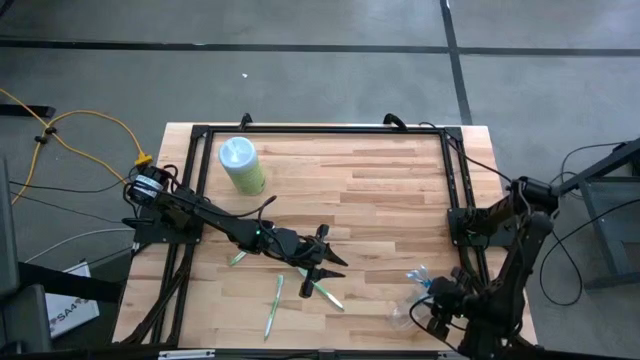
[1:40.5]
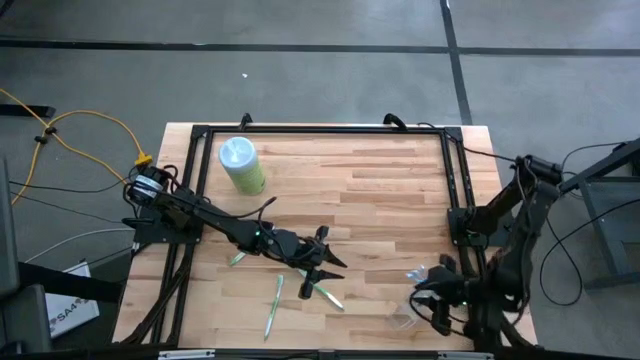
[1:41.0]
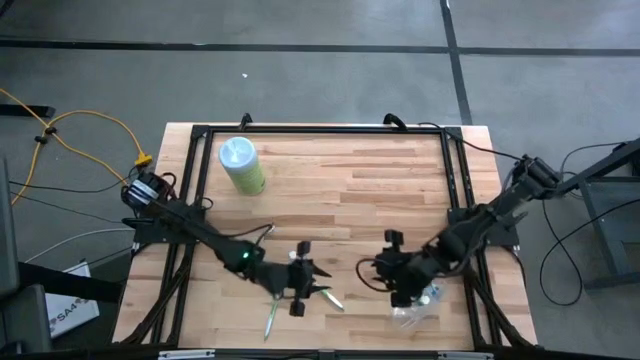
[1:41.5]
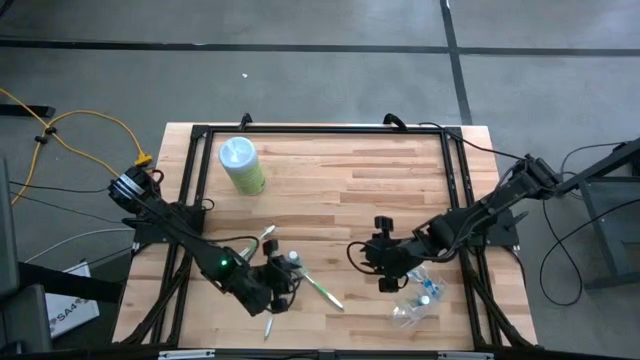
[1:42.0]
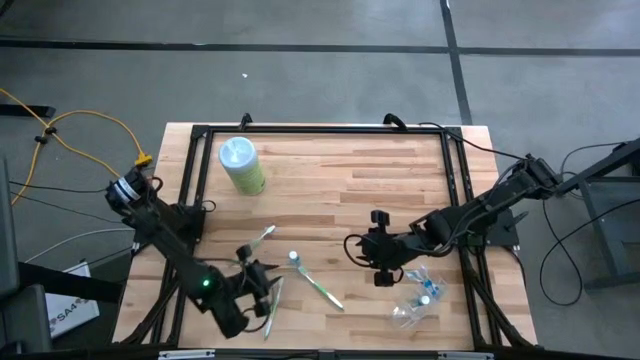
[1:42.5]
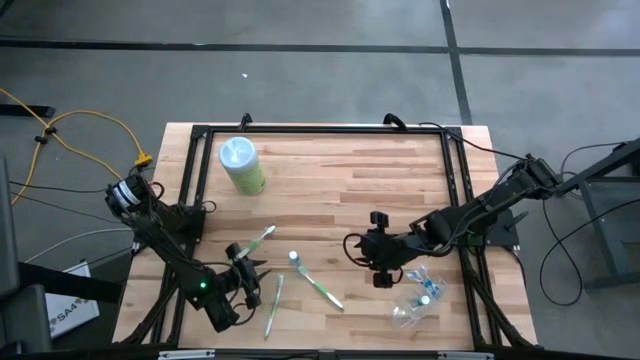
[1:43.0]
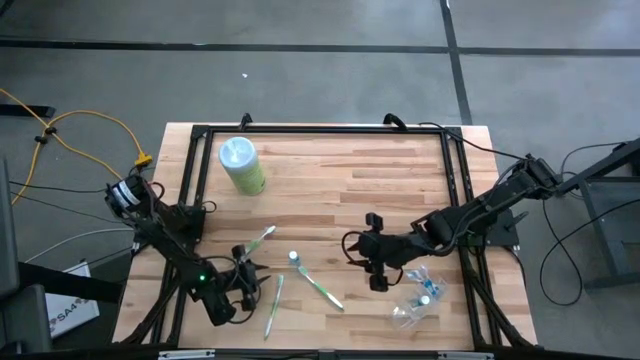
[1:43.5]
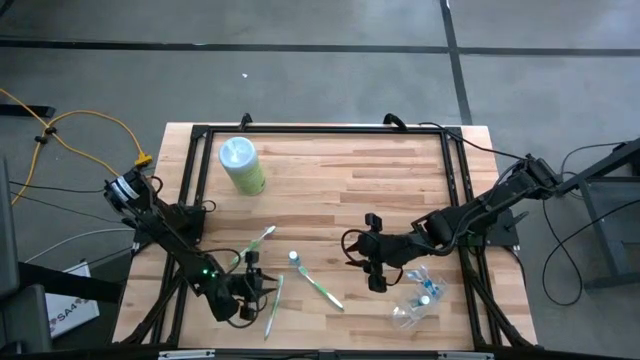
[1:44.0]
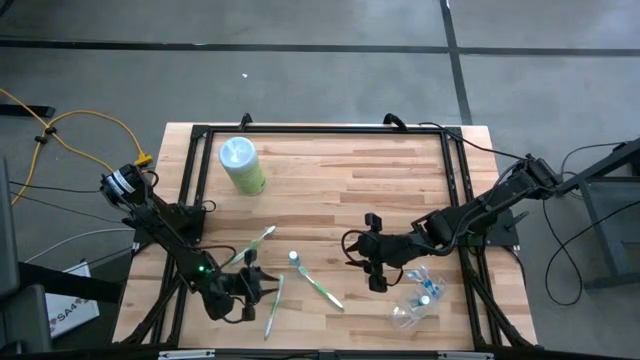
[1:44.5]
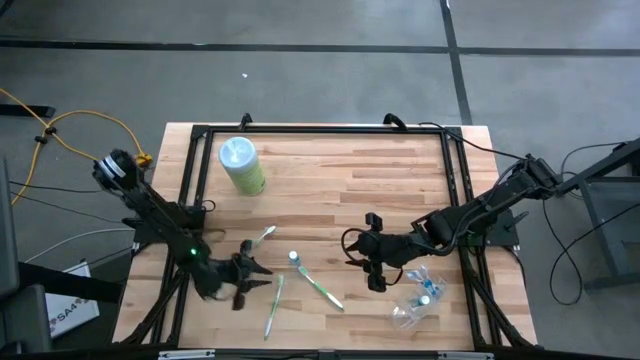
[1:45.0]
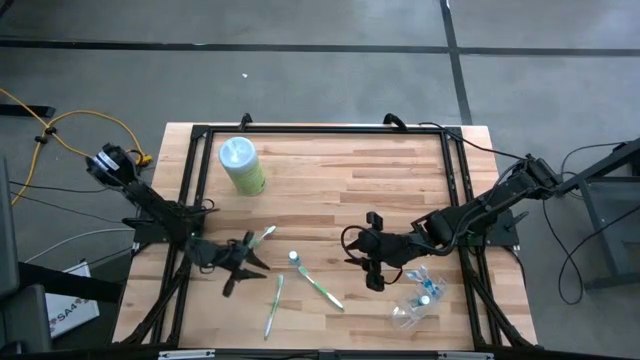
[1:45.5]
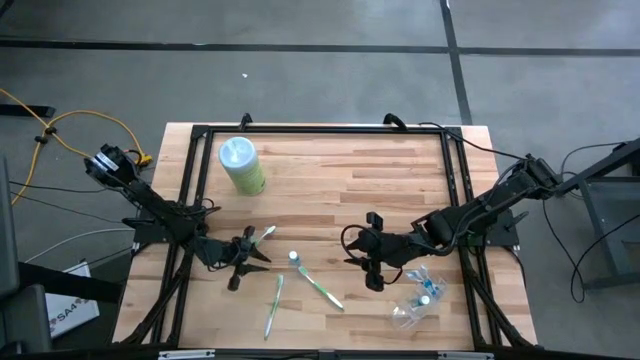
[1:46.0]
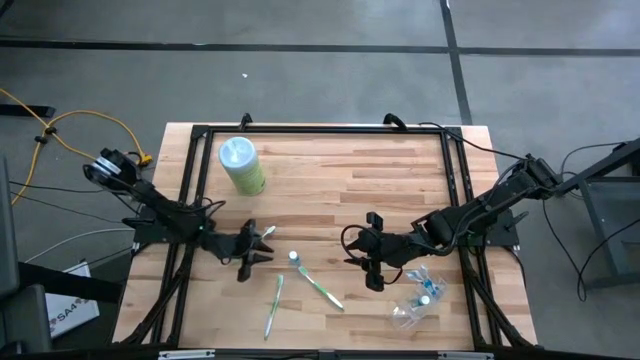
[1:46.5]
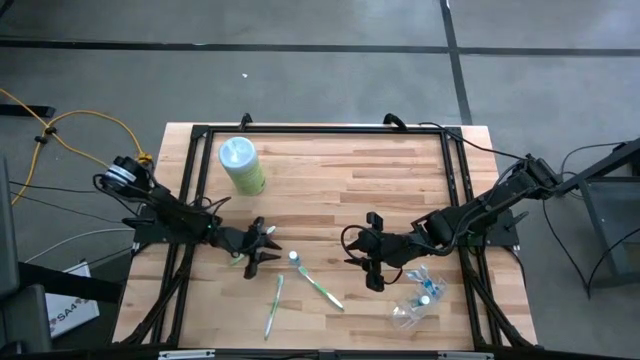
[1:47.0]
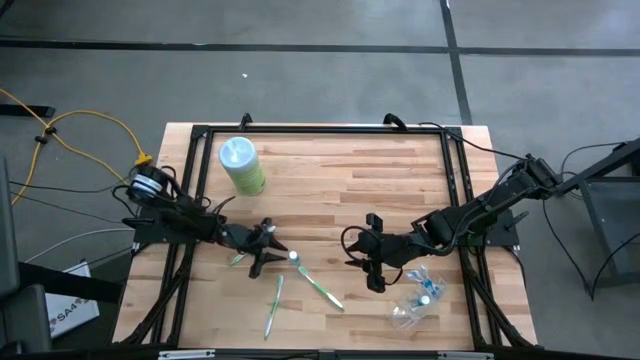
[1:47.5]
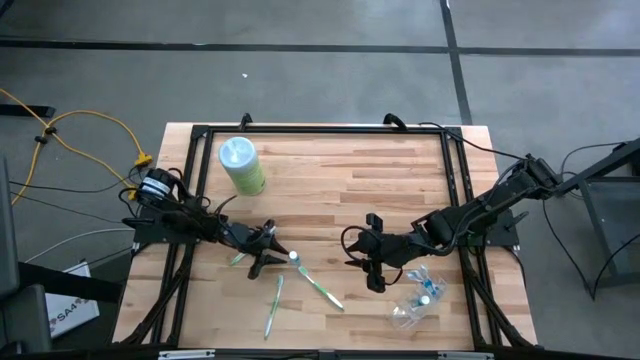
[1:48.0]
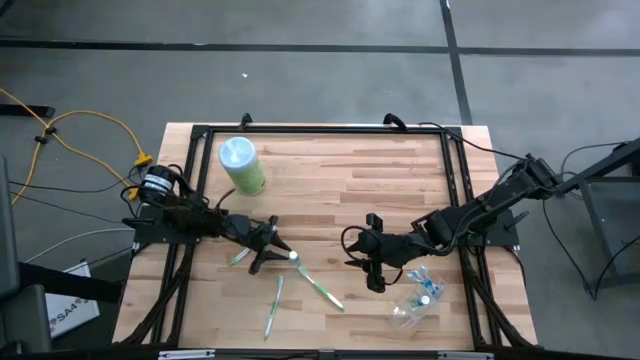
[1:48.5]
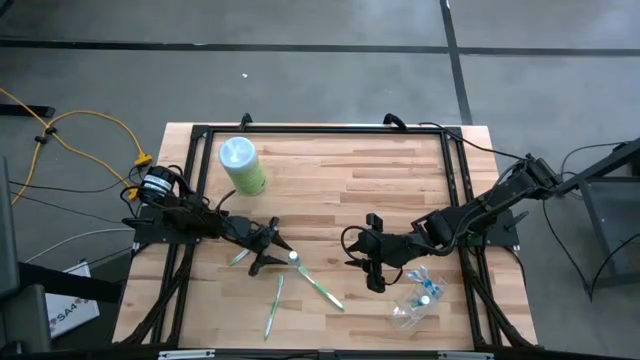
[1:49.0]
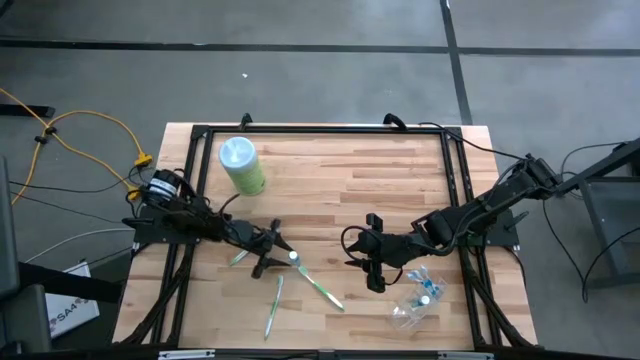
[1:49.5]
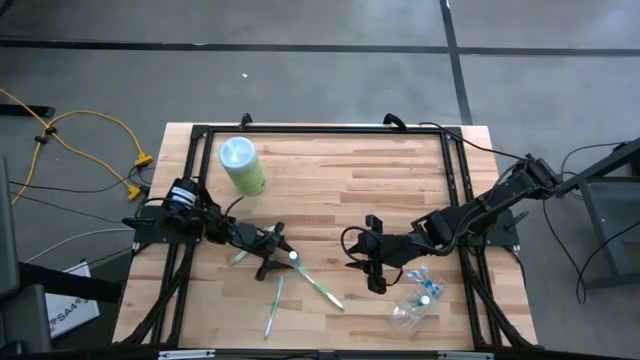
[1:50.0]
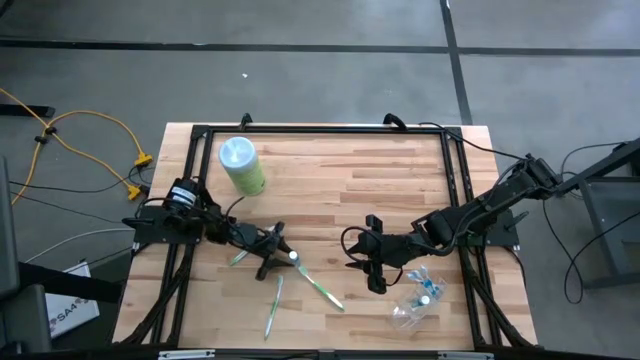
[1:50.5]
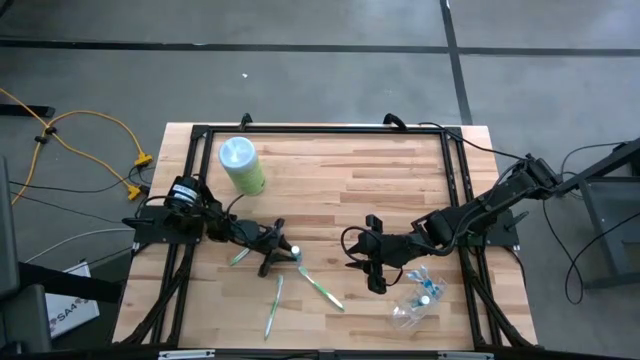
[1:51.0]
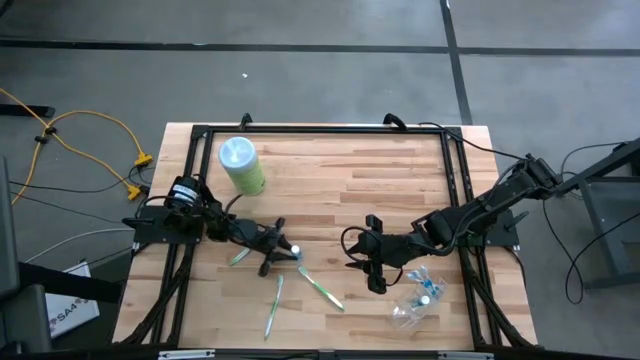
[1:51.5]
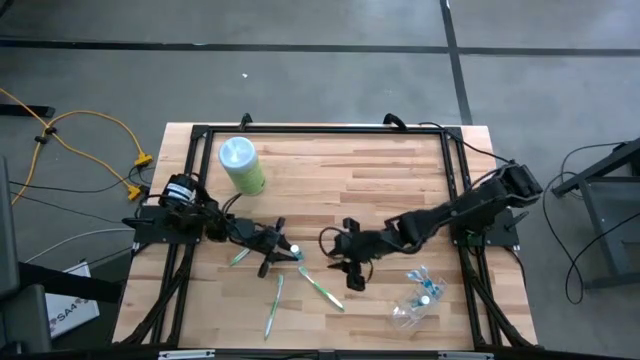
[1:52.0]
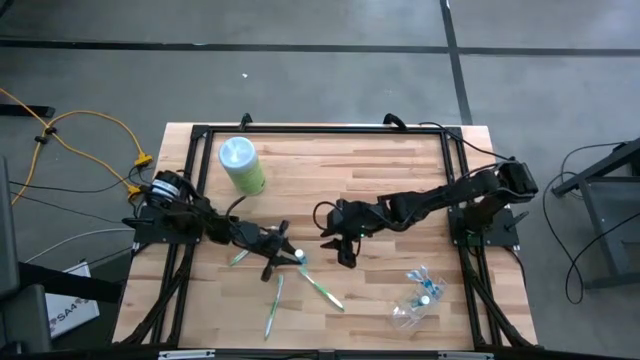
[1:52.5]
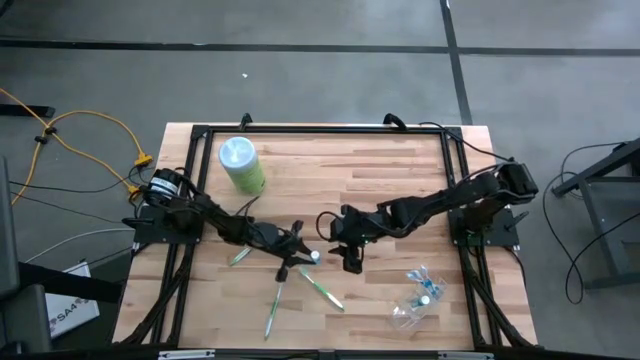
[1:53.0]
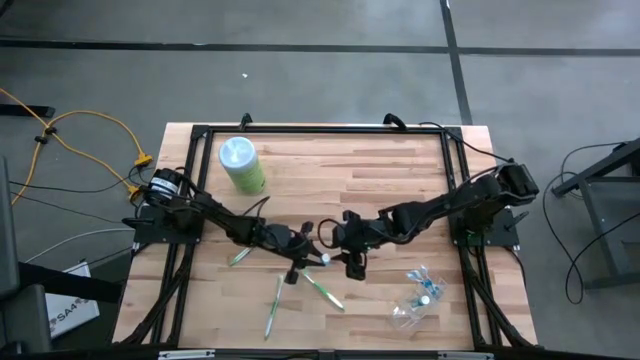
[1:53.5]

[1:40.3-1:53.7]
Task: Pick & Place toothbrushing station
Put the blue mouthwash bottle into the middle section of the transparent organizer

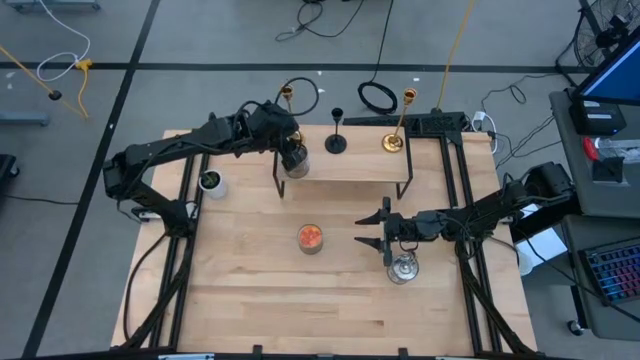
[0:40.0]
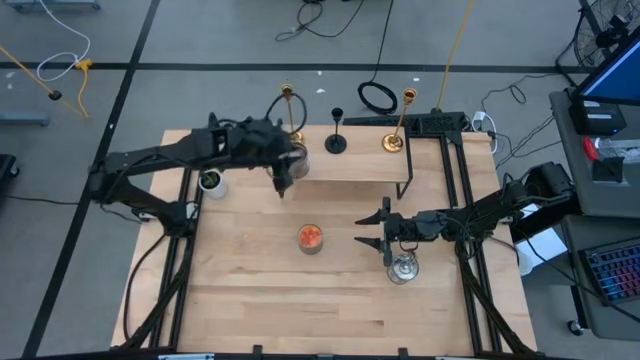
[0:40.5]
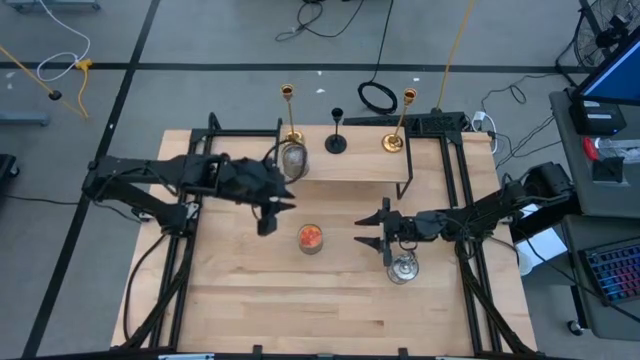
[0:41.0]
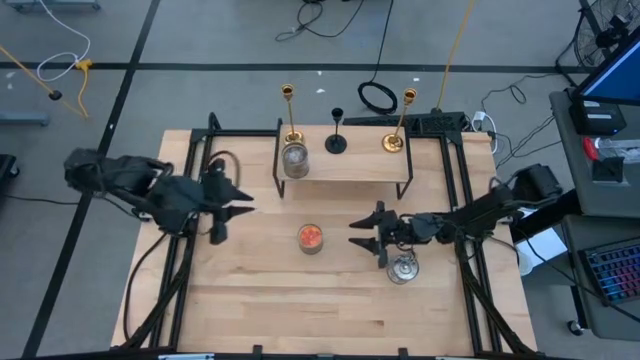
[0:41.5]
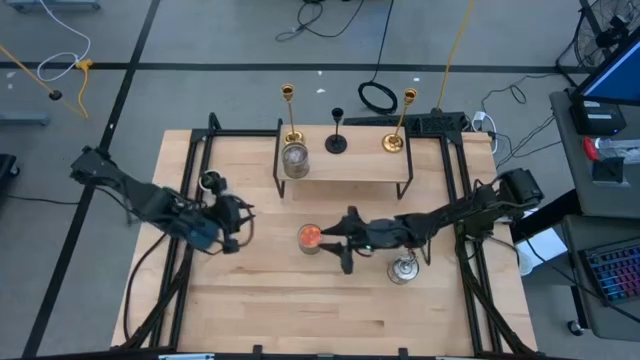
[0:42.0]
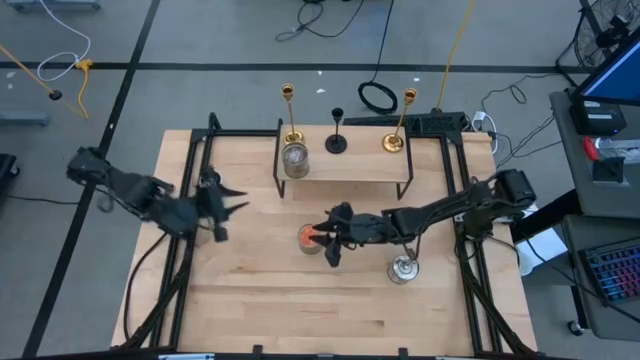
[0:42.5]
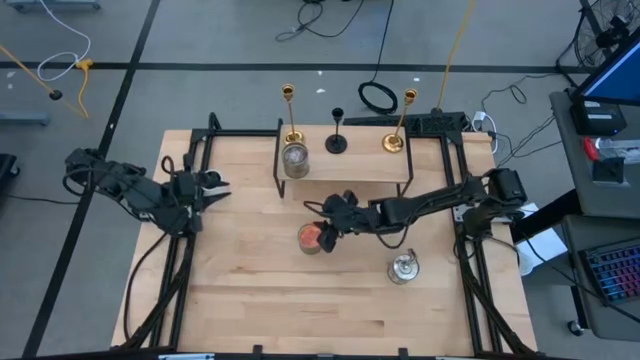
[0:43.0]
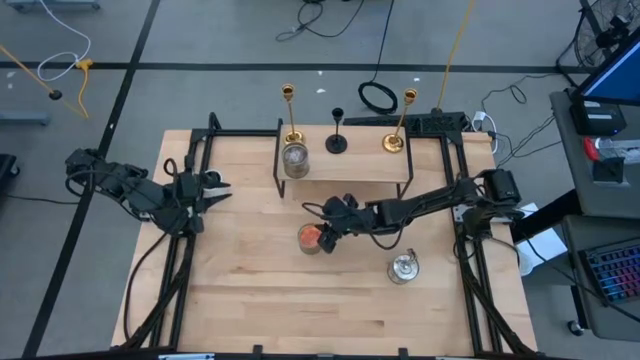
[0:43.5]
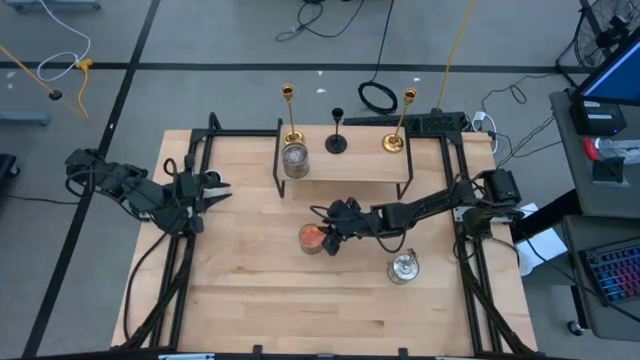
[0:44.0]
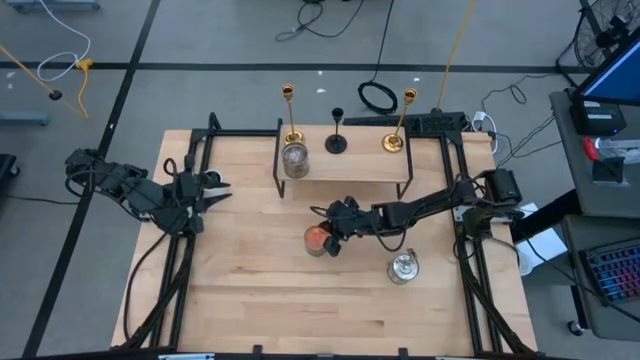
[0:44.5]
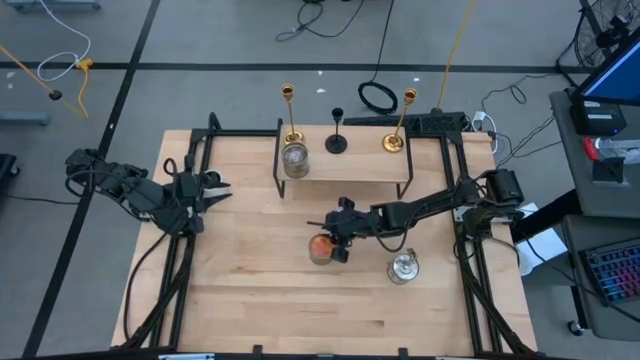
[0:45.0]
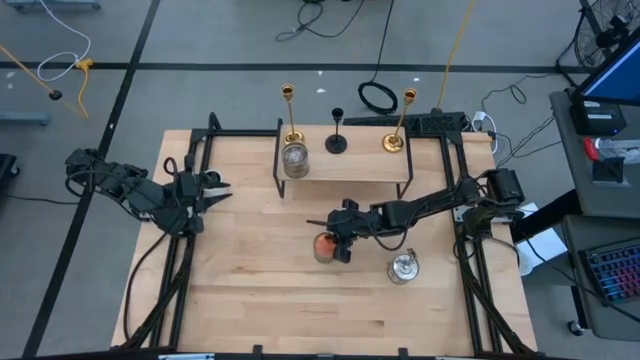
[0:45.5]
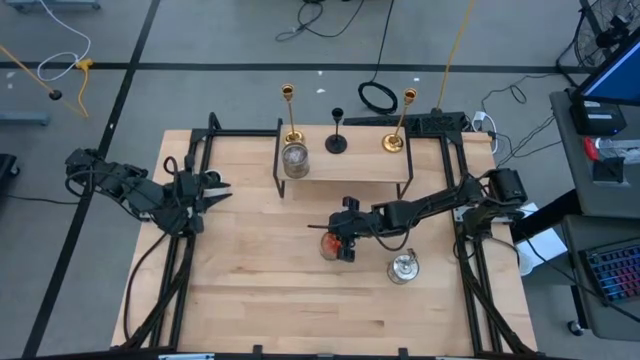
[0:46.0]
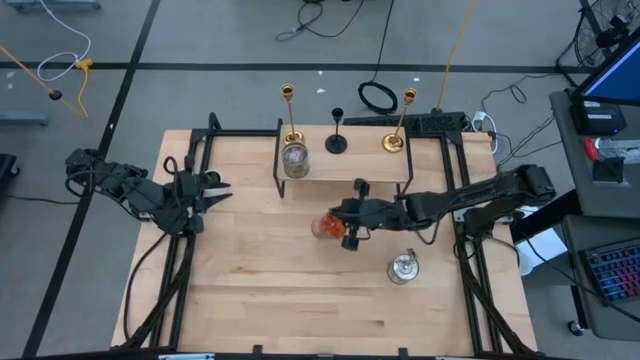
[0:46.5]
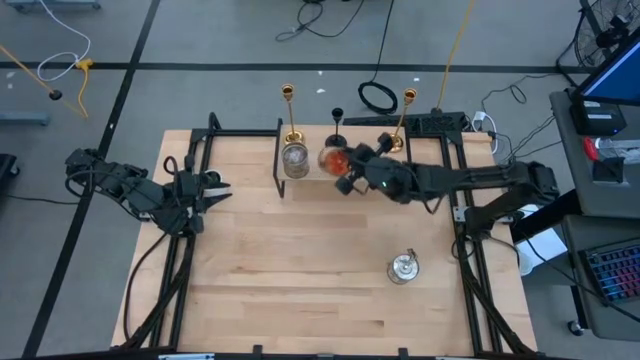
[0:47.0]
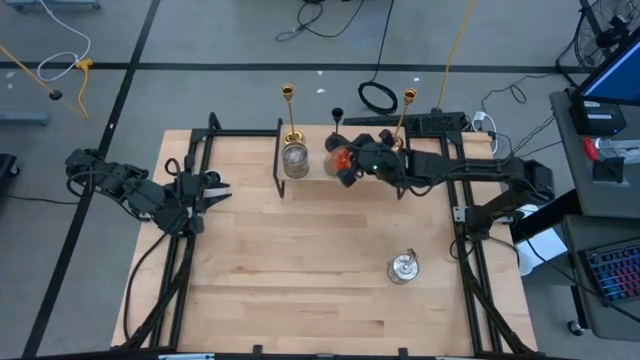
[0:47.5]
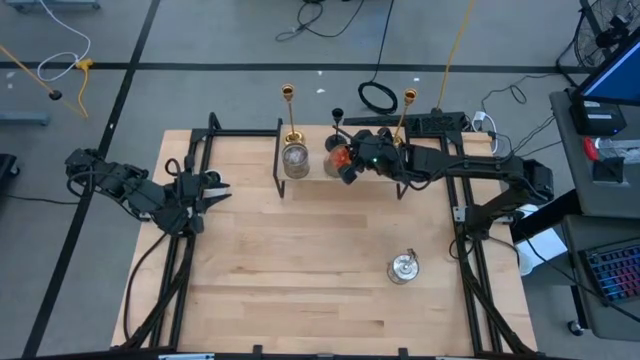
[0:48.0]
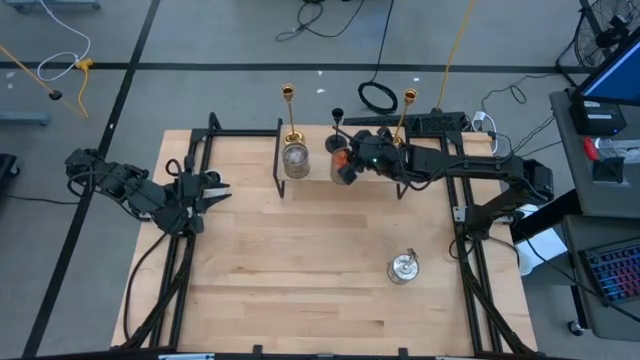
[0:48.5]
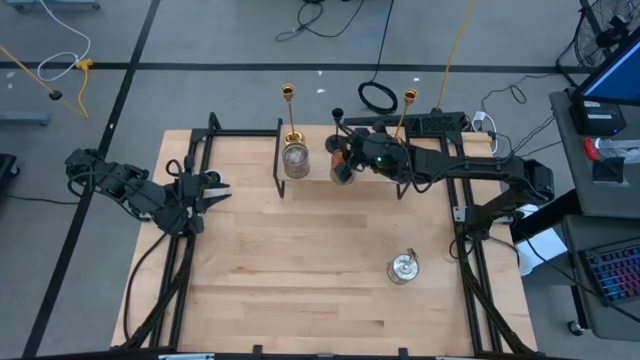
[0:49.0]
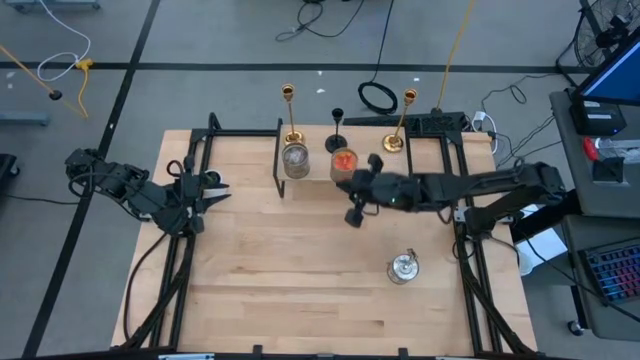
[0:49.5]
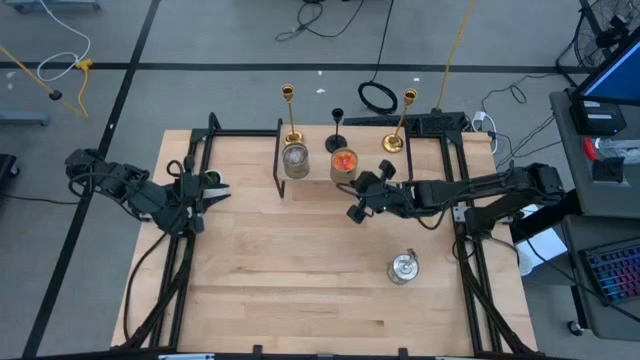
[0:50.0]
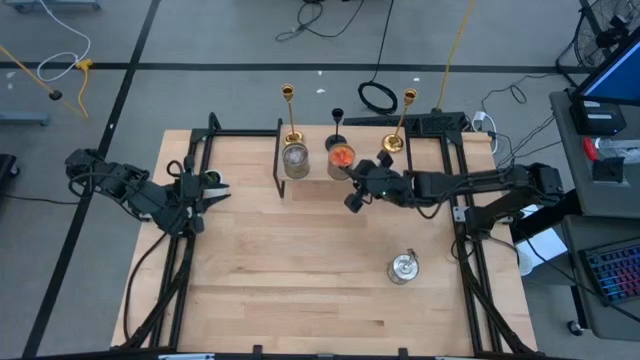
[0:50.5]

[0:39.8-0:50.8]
Task: Pick & Place candle stick holders
Put the orange scented candle aligned with the black candle holder on the shelf
